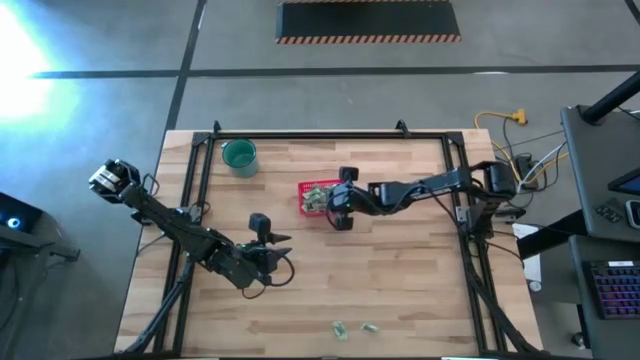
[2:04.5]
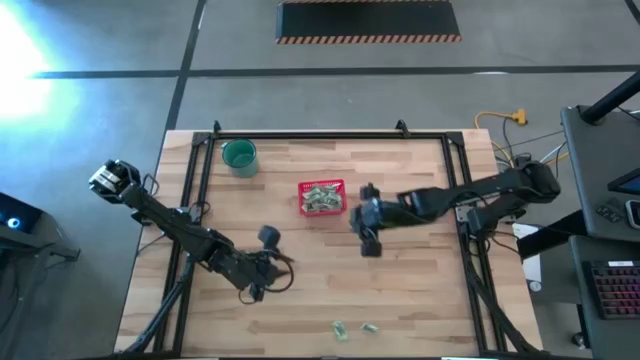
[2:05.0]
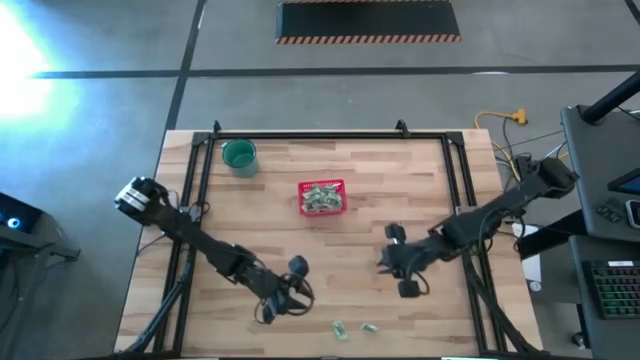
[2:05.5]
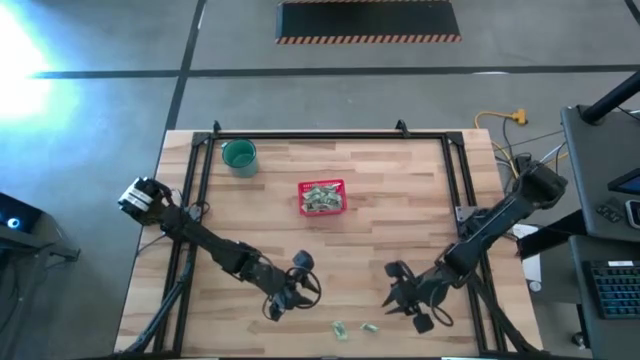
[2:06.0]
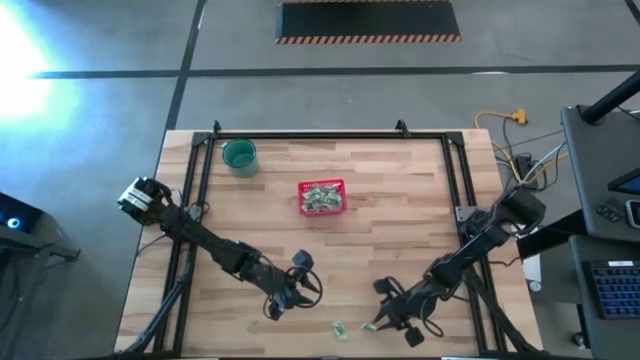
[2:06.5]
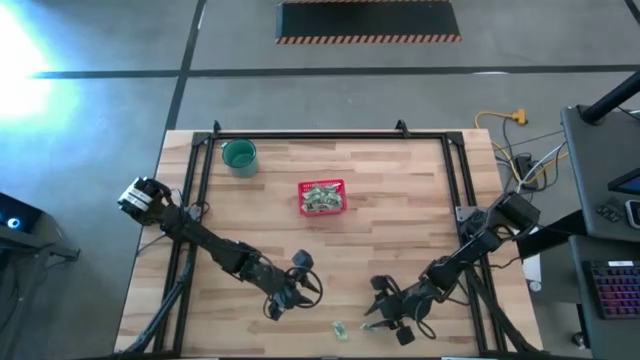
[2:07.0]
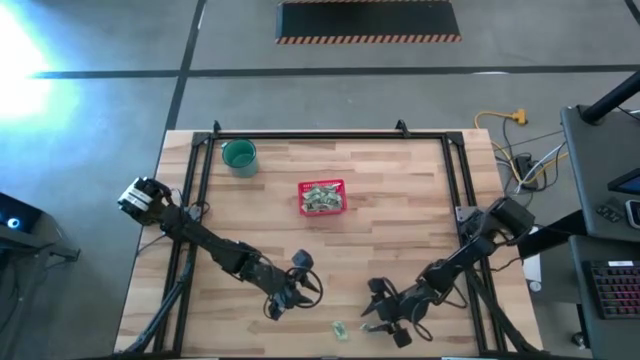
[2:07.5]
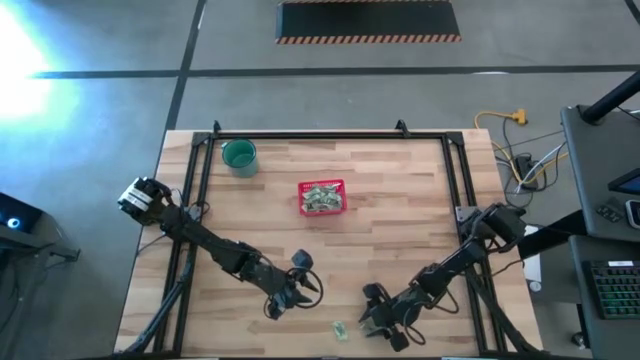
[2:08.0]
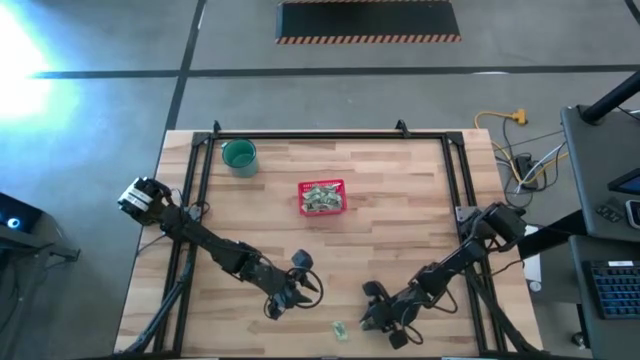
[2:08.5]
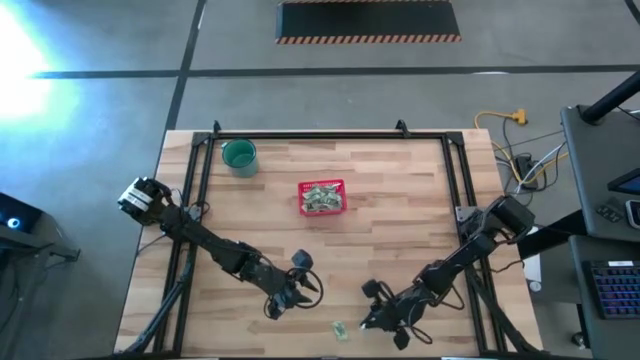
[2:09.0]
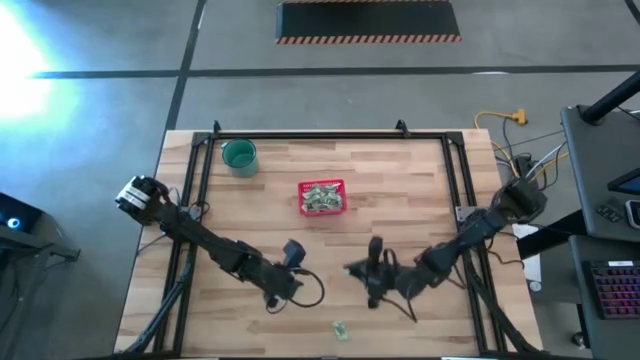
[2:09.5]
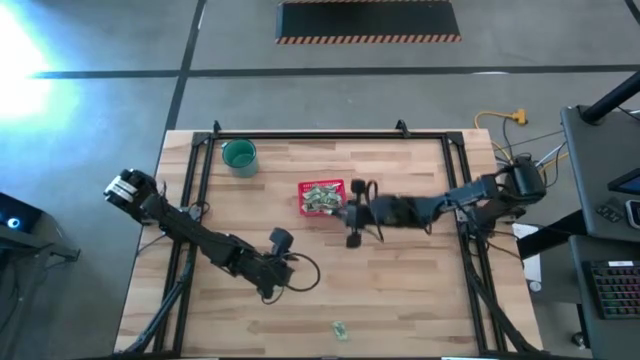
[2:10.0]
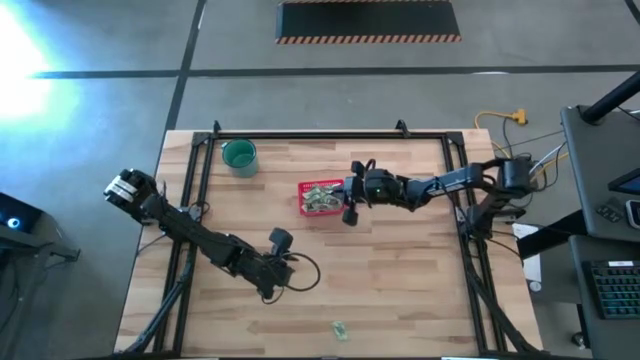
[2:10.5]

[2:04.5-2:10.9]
Task: Pick and place items into bin
Put the stevia packet into the red bin

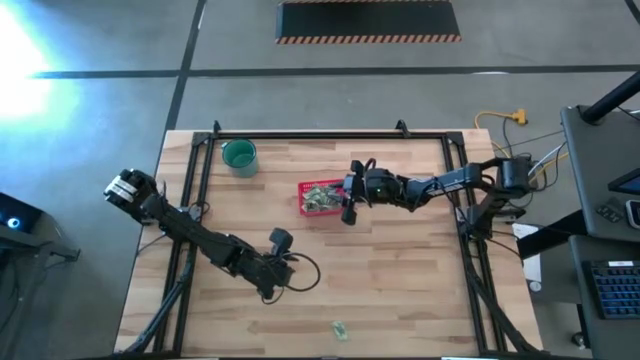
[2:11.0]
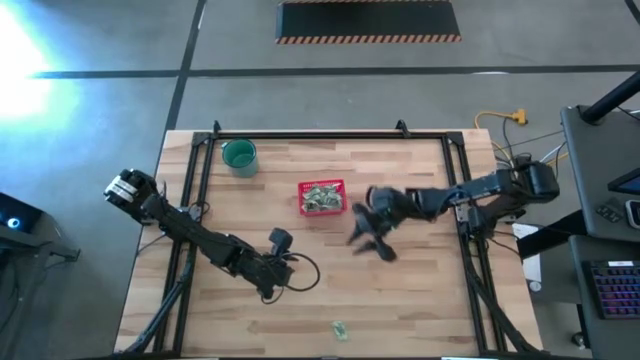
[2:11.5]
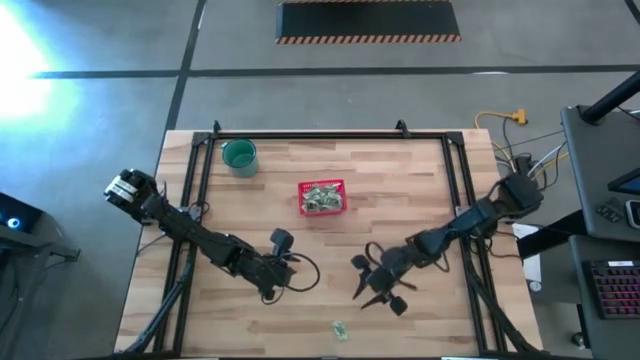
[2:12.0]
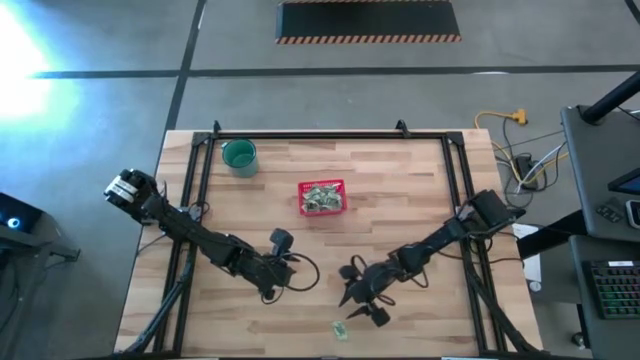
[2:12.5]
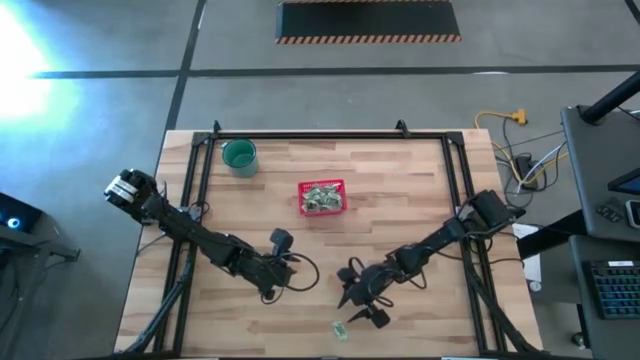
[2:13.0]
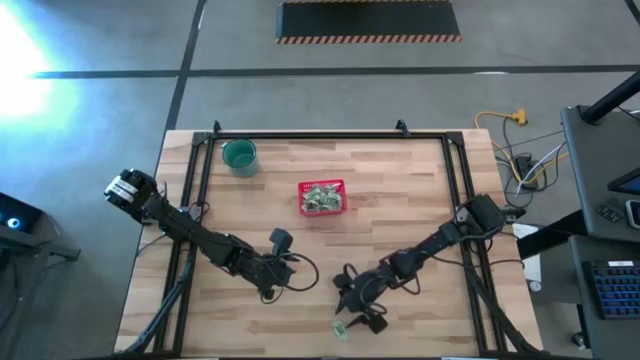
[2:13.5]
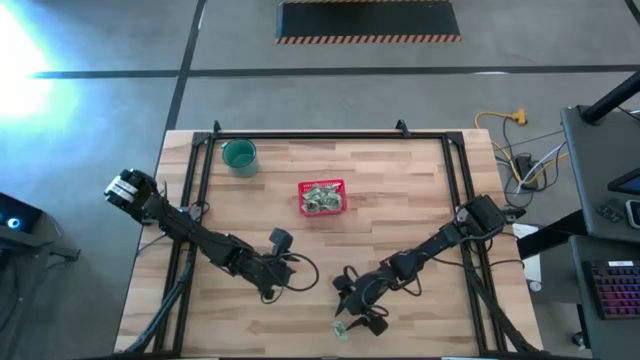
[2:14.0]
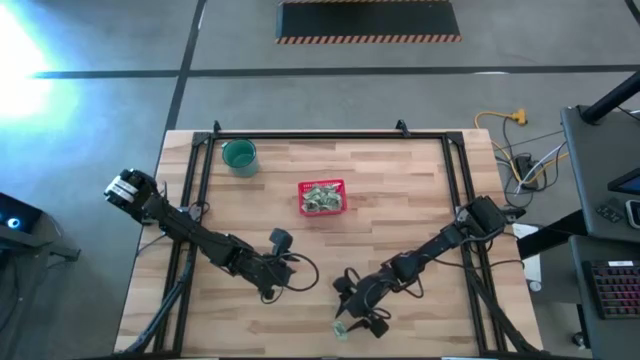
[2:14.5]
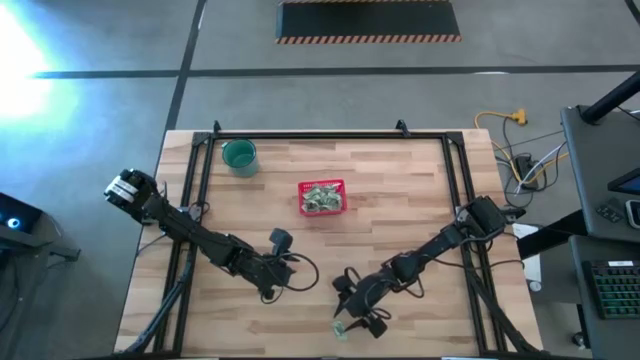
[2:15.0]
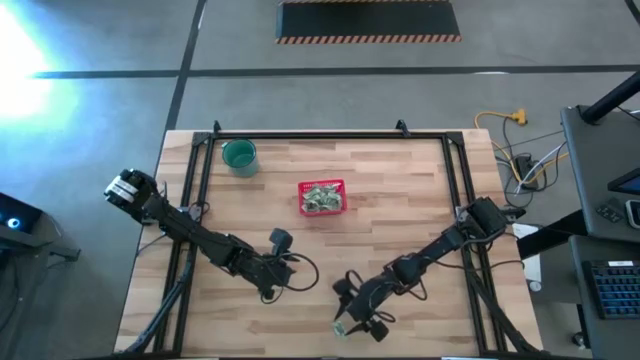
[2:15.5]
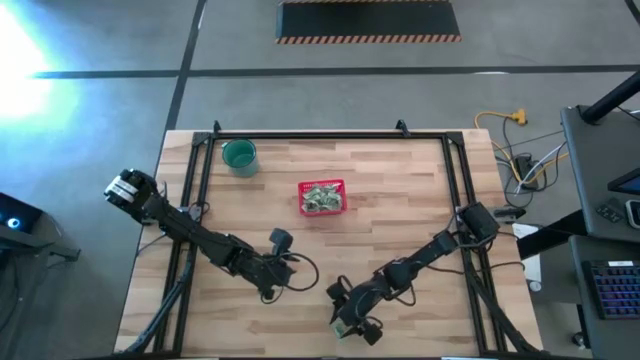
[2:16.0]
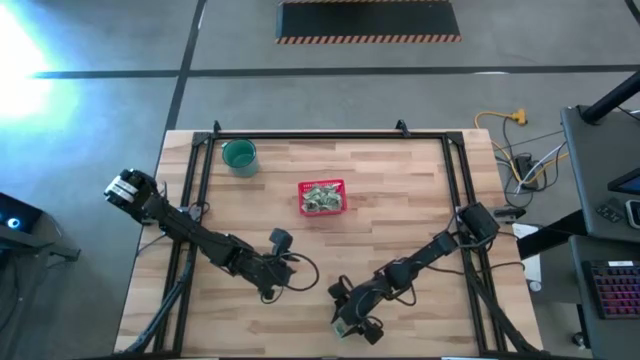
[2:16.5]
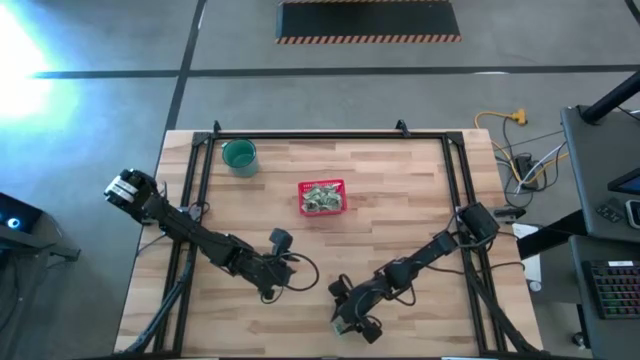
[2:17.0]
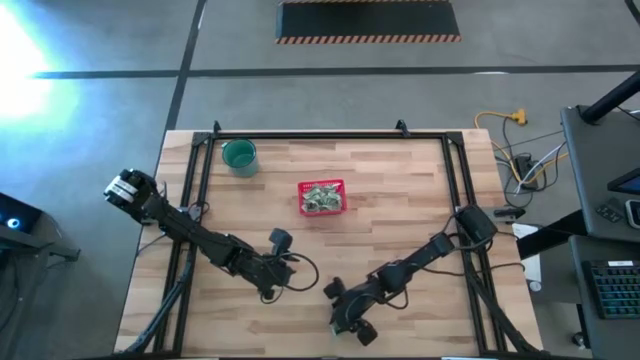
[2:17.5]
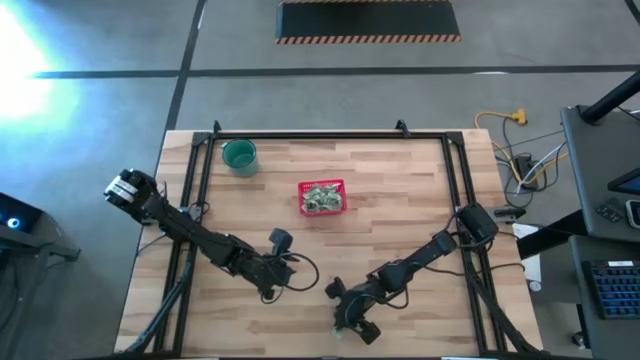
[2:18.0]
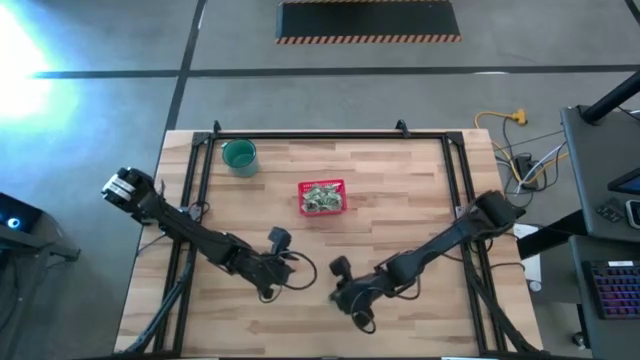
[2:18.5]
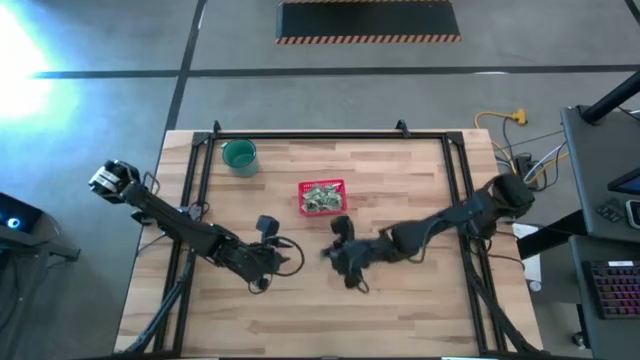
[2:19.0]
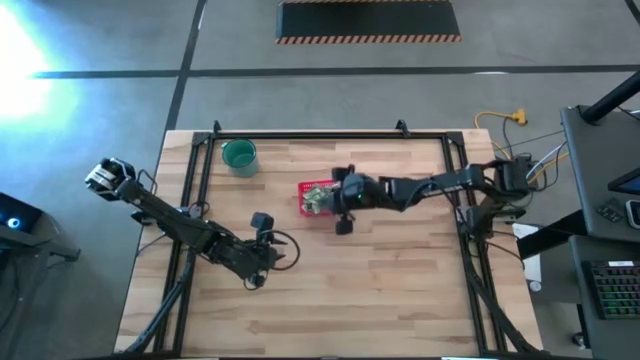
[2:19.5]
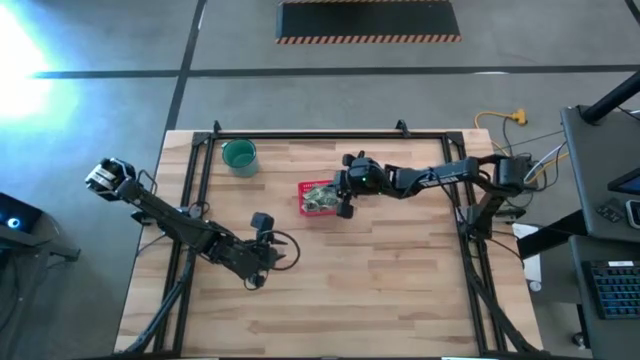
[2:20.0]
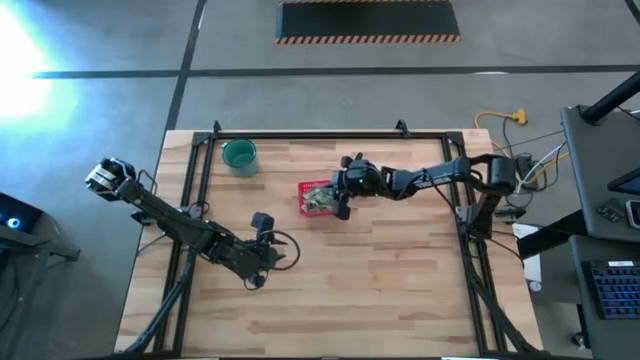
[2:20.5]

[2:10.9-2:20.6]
Put the stevia packet into the red bin

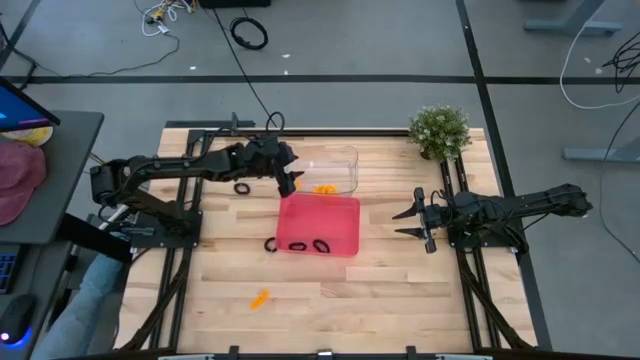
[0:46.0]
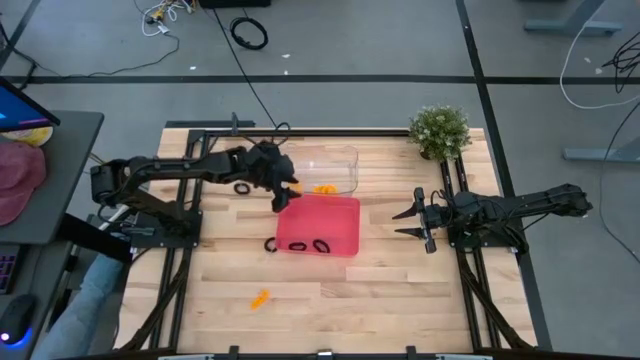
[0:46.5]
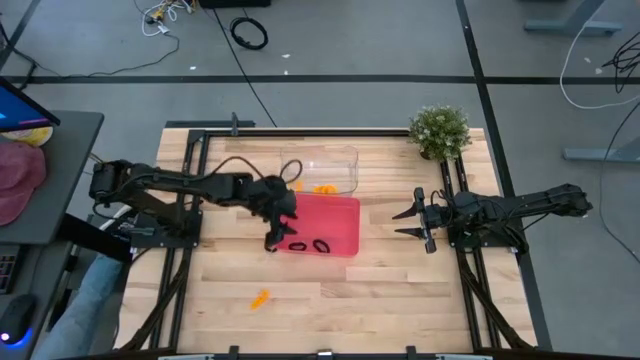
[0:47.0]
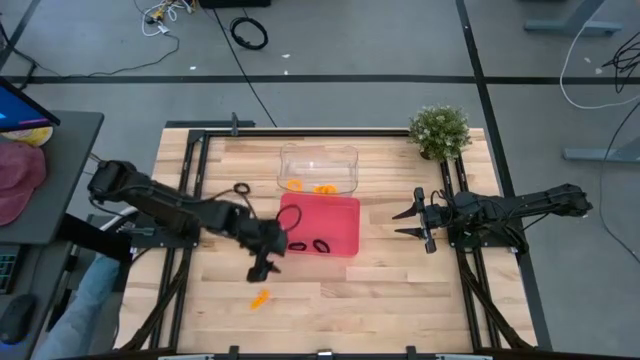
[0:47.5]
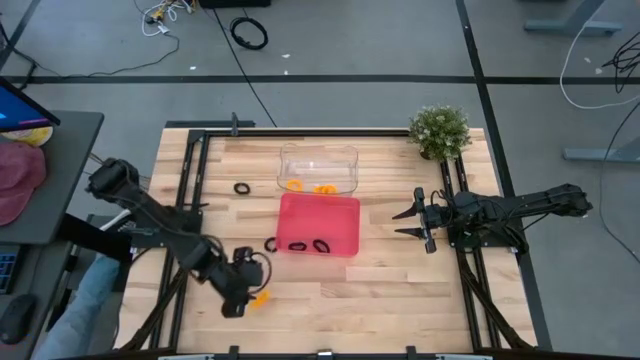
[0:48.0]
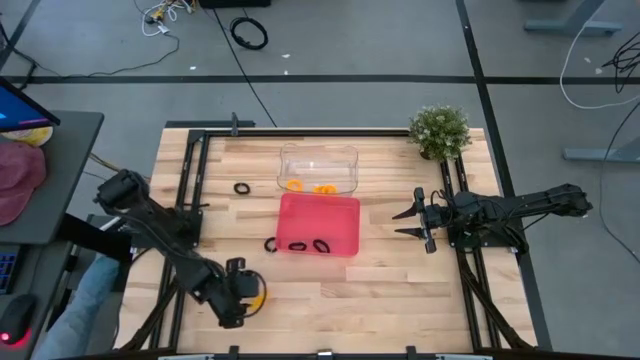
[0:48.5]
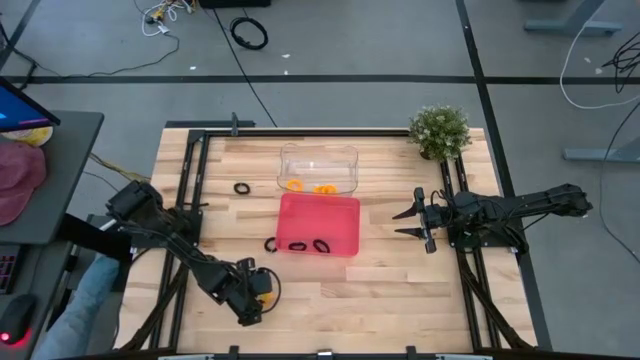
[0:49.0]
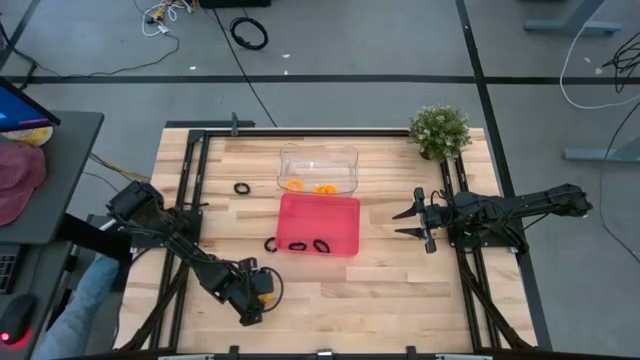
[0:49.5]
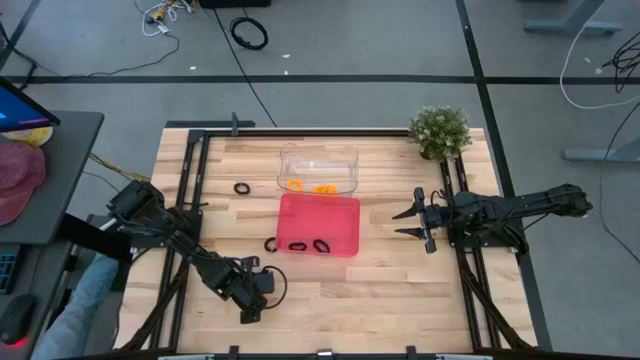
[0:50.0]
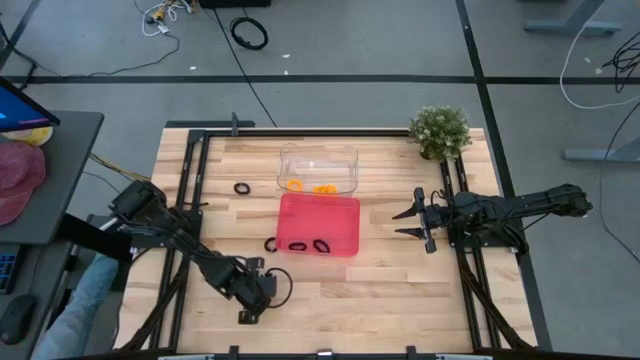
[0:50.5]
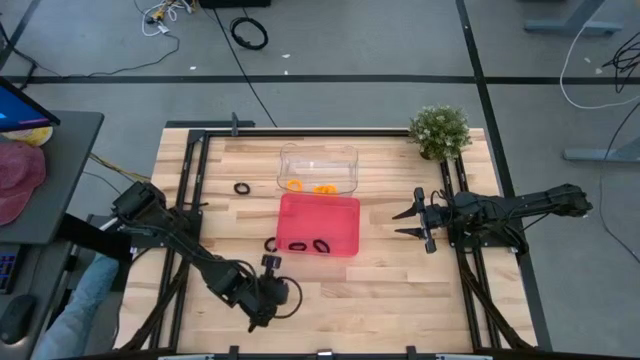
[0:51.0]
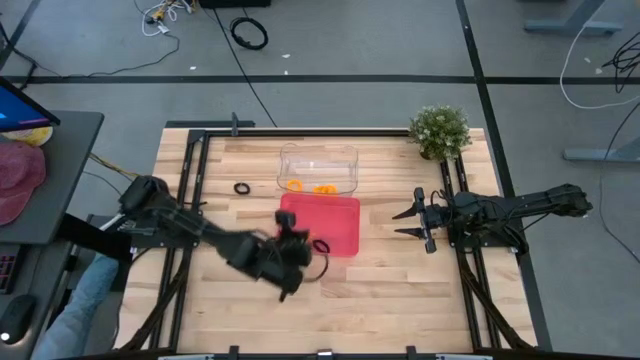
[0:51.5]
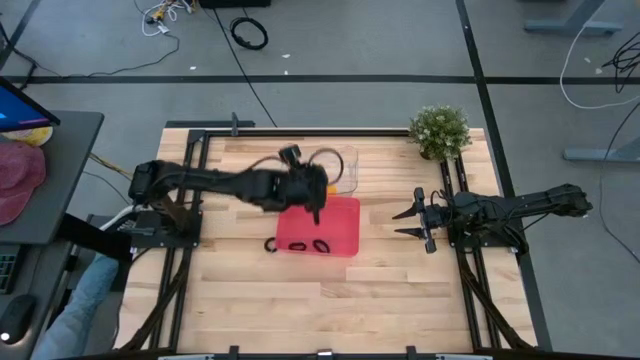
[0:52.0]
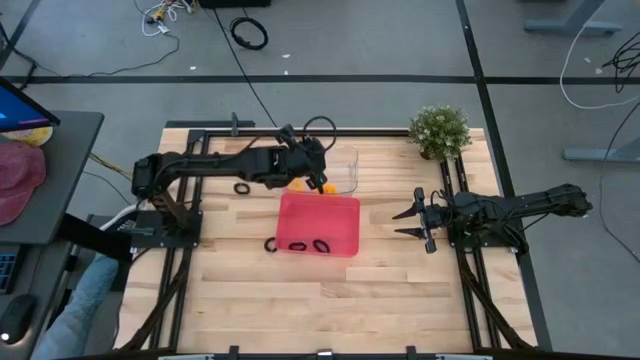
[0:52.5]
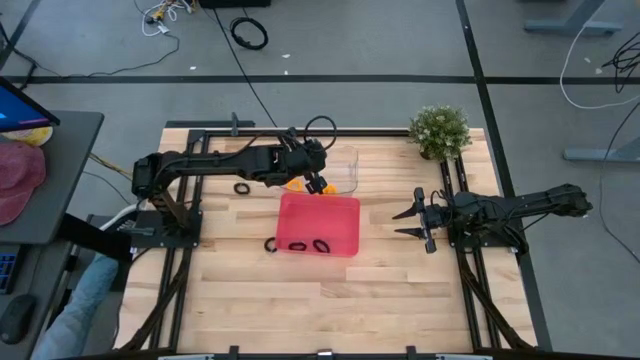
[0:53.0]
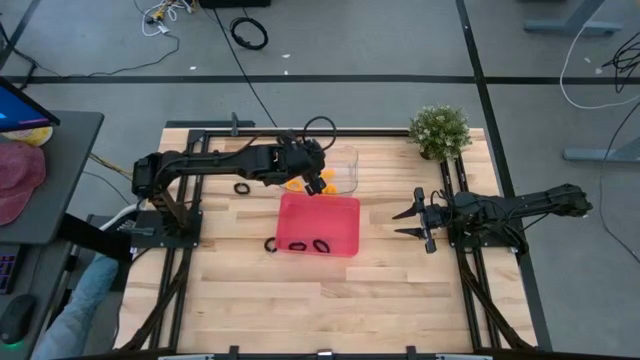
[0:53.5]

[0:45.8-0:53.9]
Task: Sort spring keychains
Put the orange spring keychain into the transparent bin
